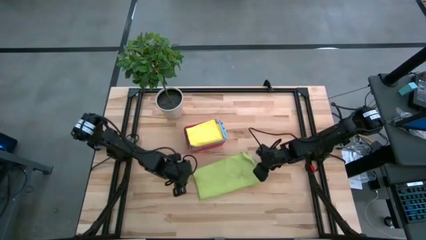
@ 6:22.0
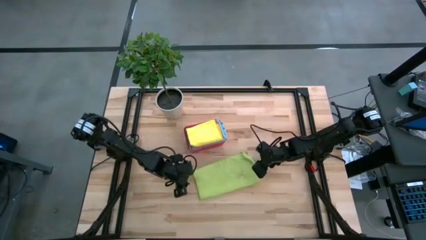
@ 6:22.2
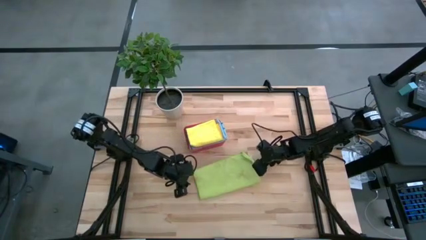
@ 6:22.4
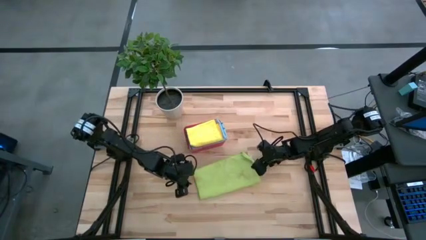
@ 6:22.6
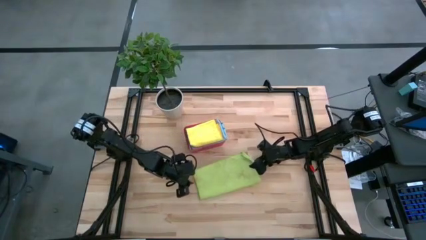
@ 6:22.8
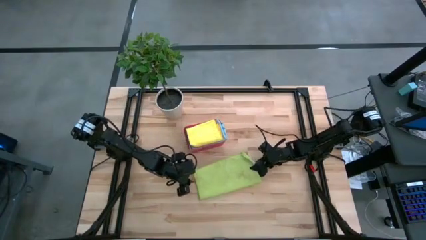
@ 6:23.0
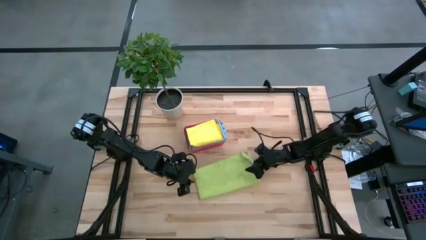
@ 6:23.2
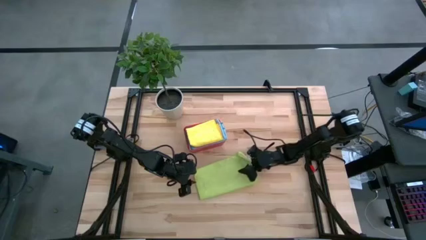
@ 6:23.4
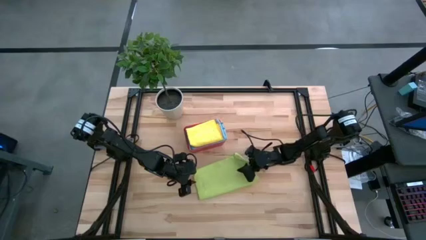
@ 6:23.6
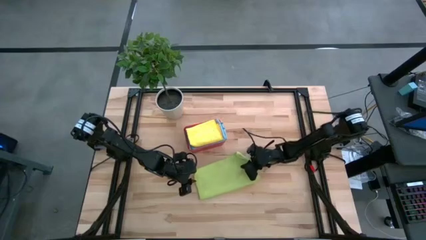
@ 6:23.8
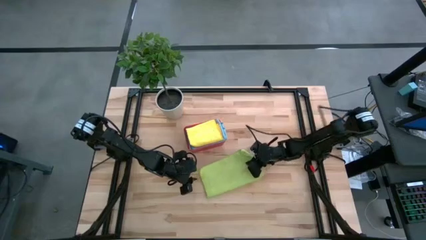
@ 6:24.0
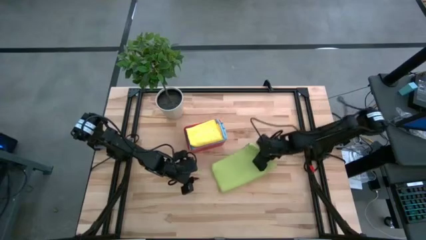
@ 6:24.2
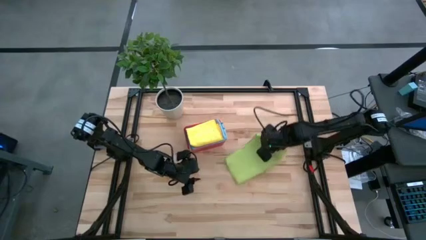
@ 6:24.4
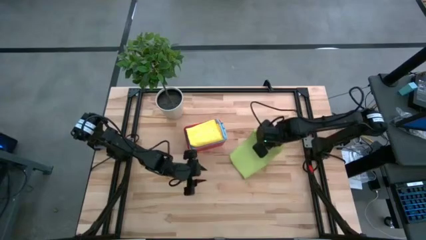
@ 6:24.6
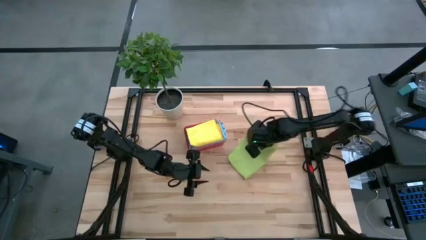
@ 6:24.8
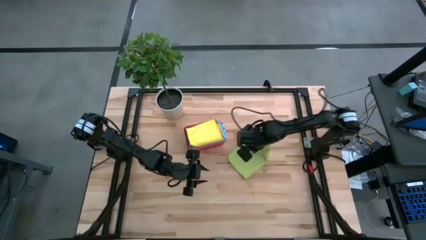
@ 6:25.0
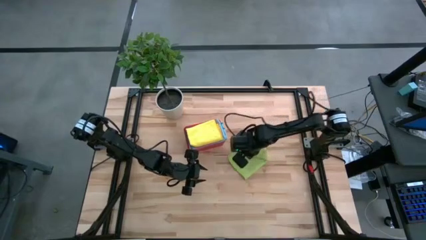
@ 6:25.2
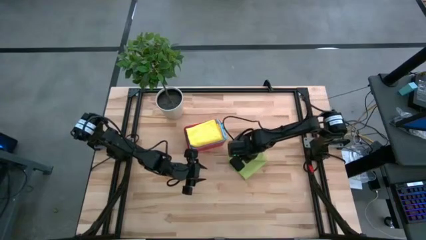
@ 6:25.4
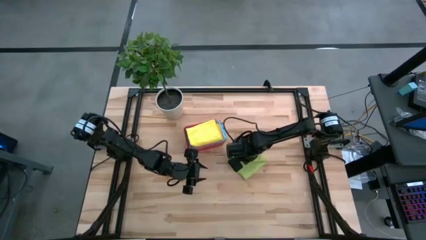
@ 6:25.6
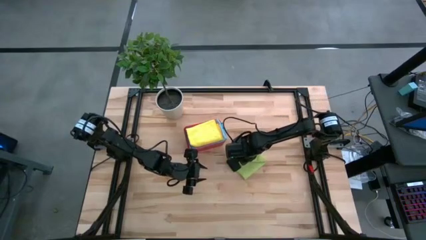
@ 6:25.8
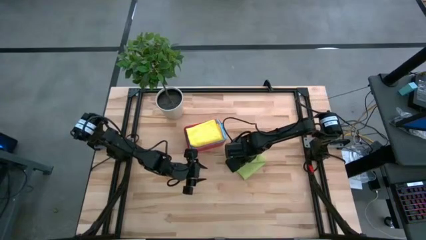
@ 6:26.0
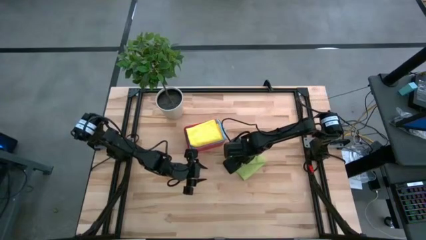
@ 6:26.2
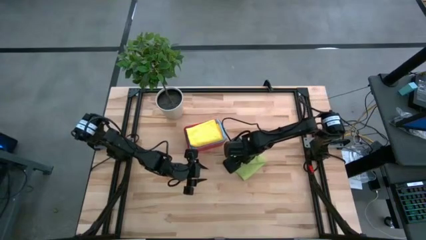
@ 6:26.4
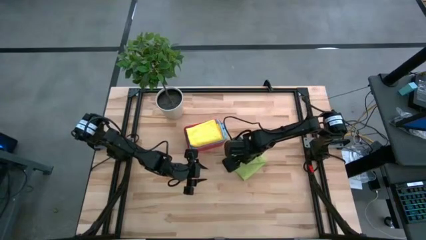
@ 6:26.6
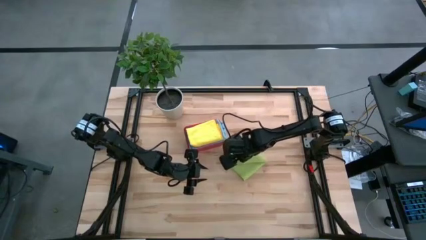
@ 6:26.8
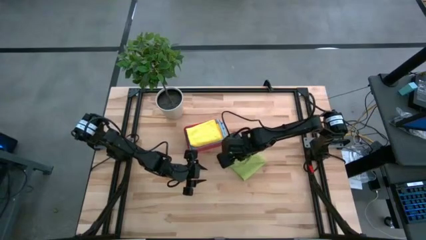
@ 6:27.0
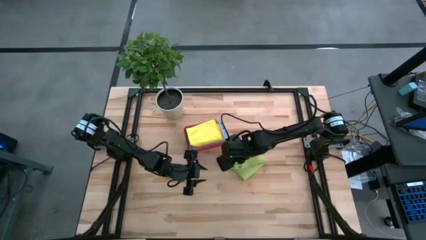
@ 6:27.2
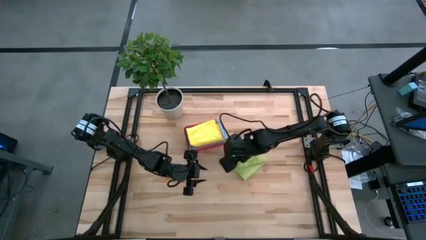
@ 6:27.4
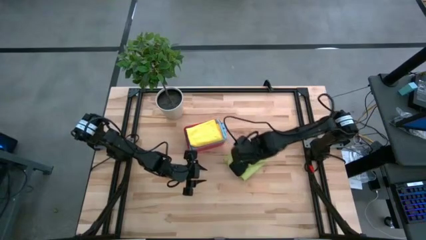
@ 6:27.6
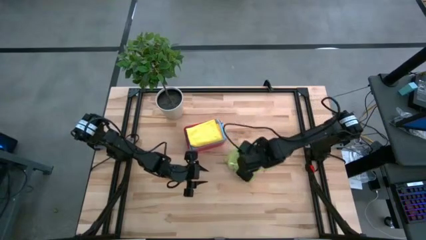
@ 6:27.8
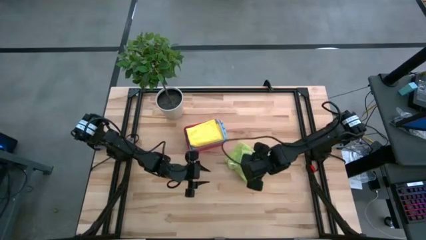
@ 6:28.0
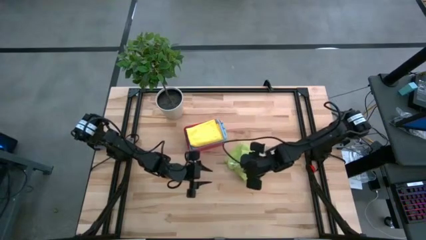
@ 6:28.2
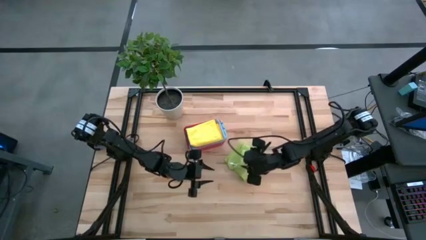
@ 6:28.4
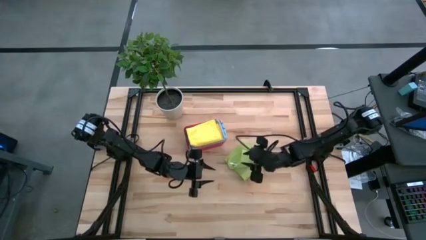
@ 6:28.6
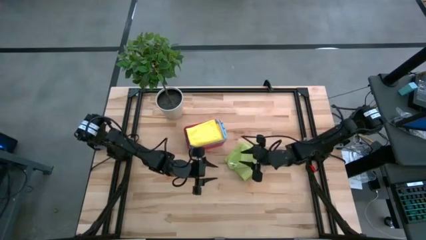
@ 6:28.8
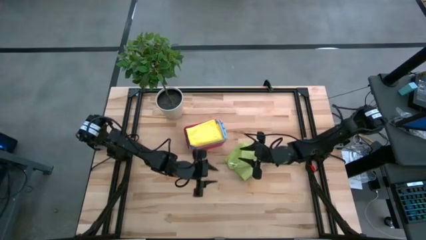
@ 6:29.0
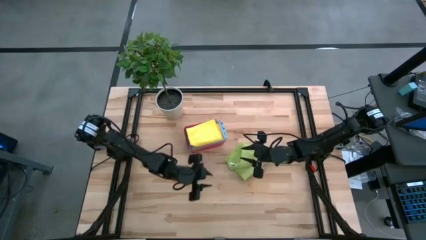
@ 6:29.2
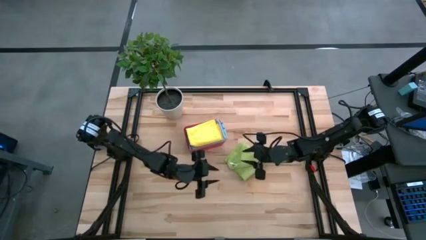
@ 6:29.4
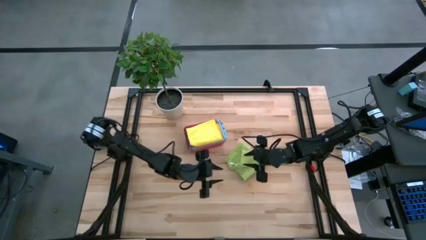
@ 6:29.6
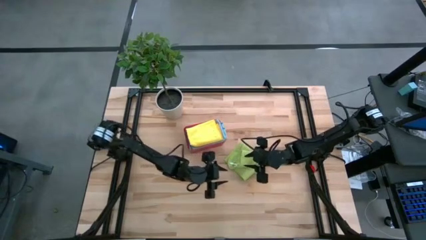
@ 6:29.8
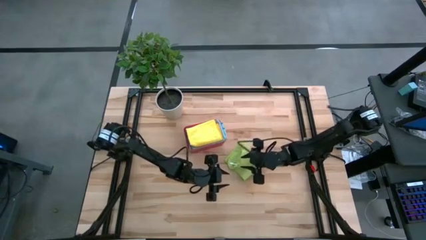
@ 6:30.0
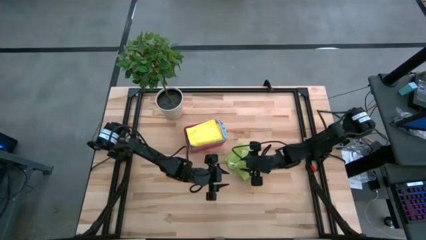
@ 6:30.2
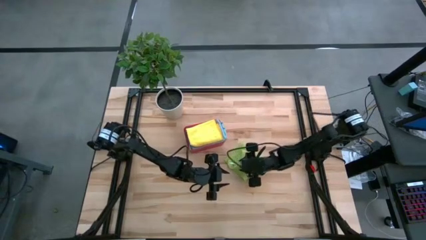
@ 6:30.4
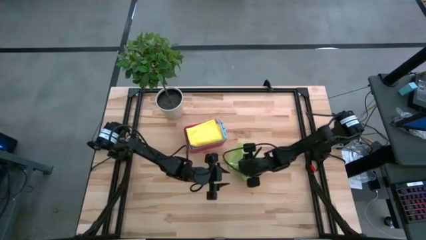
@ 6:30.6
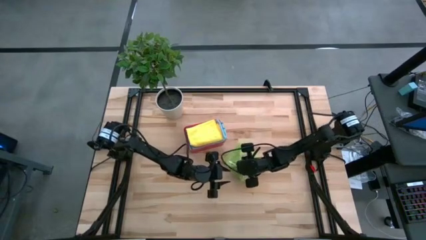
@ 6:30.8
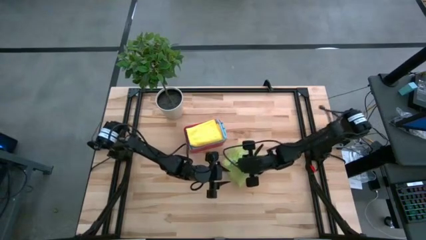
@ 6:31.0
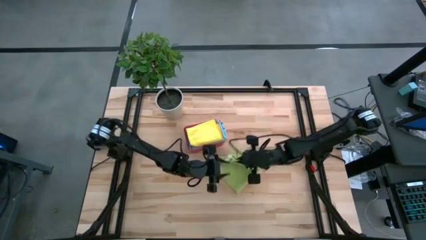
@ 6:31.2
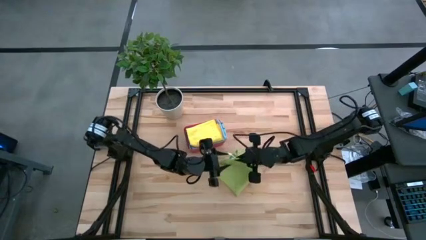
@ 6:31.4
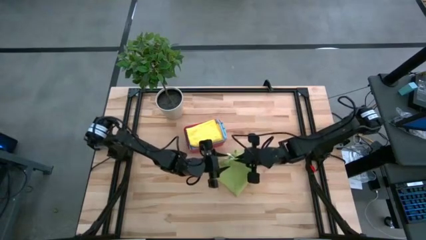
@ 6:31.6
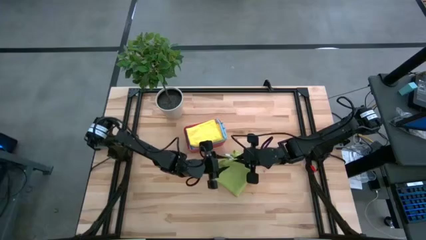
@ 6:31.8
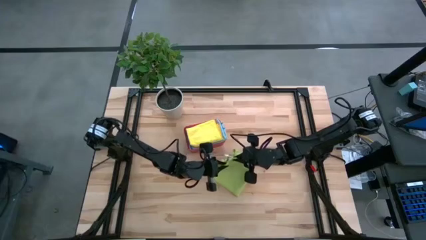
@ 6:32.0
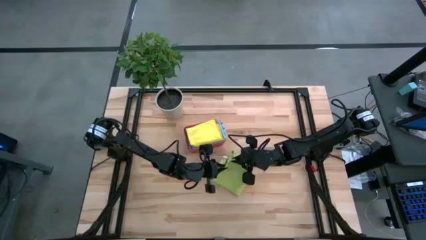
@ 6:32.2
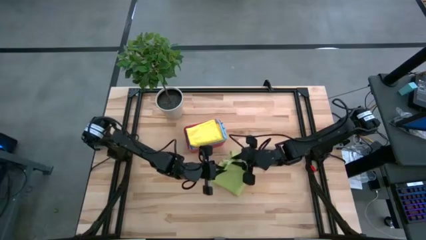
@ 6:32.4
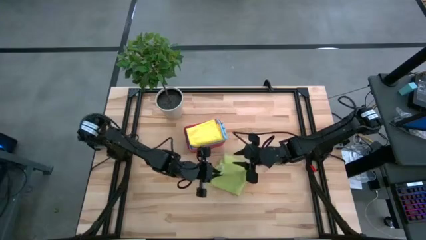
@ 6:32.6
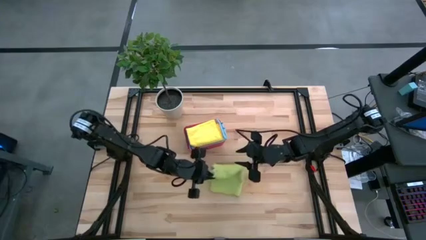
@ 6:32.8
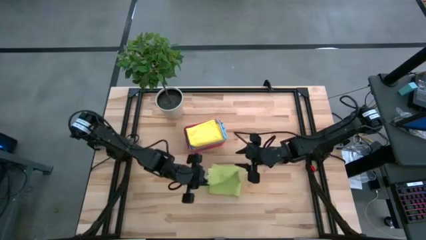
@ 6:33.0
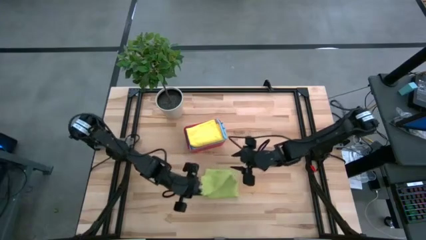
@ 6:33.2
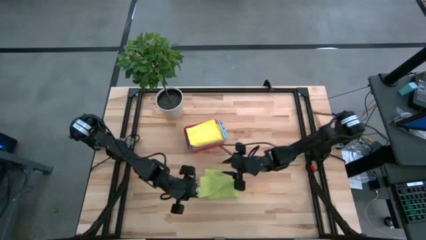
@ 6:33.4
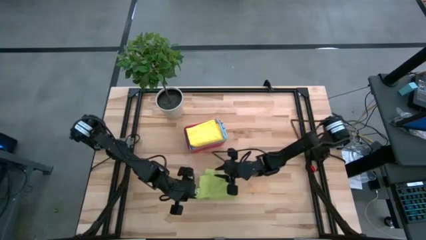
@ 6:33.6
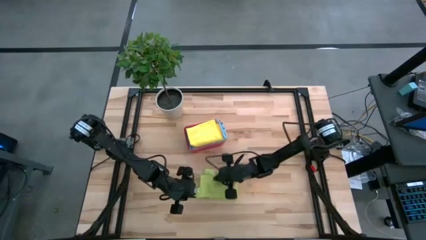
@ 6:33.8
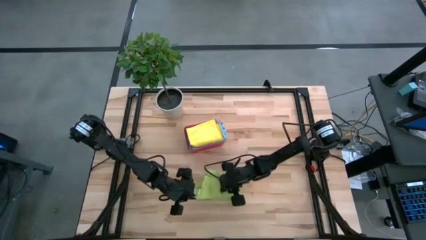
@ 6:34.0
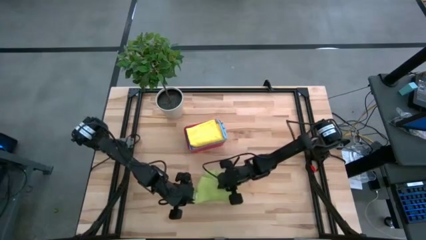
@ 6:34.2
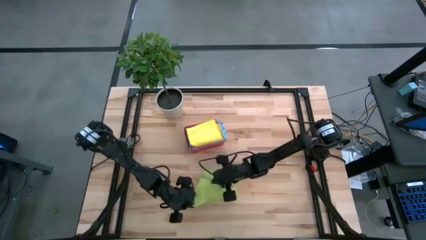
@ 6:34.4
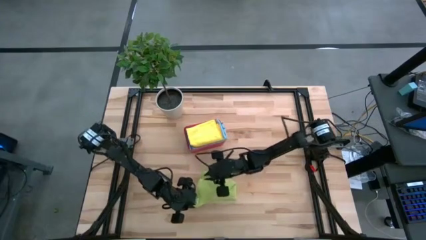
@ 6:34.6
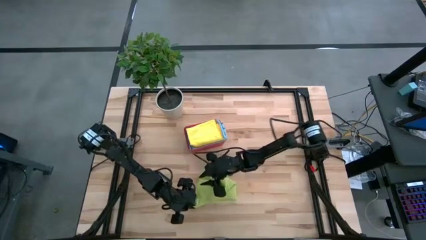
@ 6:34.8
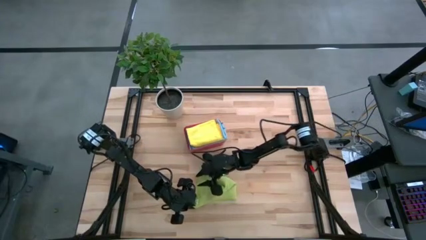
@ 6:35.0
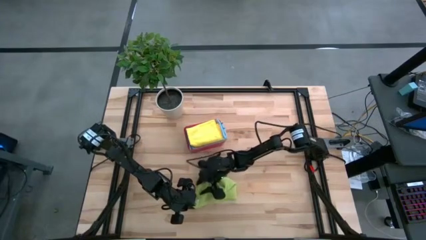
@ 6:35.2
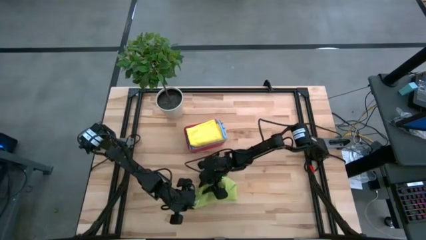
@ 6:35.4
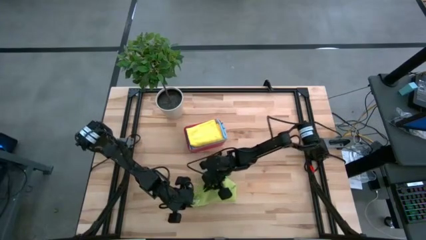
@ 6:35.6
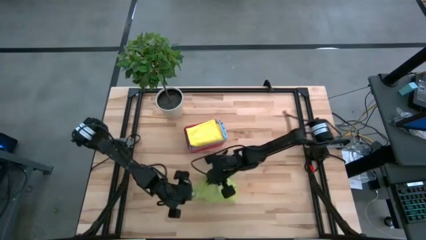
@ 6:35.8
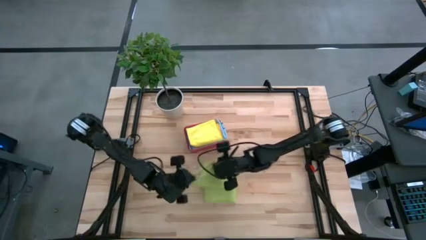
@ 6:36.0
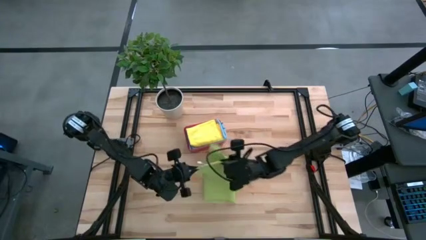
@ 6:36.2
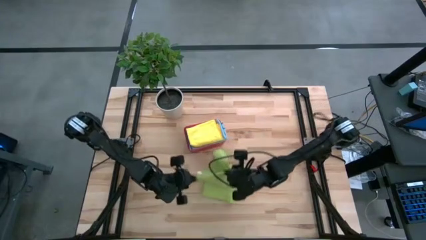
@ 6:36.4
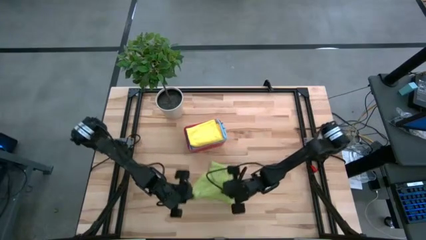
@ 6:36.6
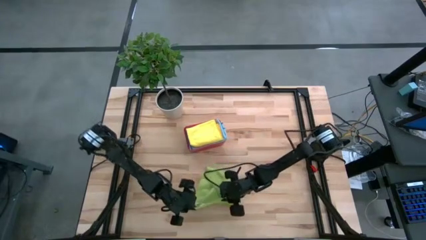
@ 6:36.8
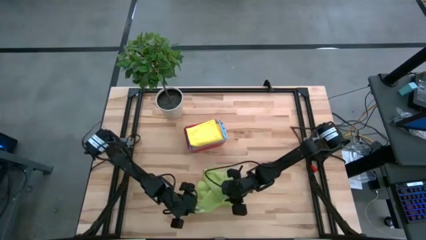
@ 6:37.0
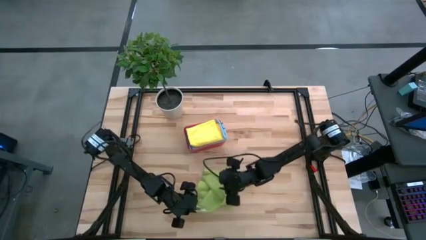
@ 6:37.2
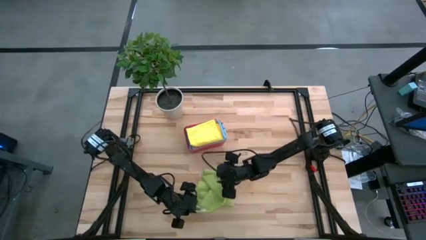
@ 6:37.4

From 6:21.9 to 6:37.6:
Task: Fold microfiber towels
Fold the green microfiber cloth

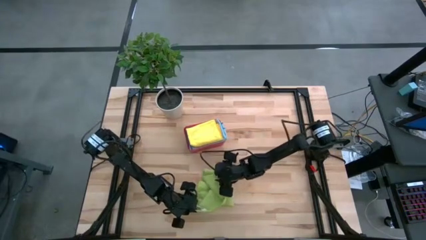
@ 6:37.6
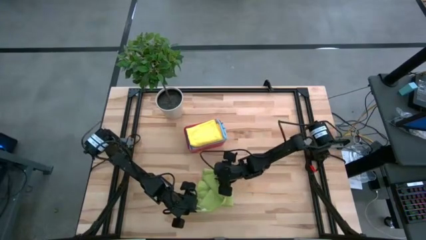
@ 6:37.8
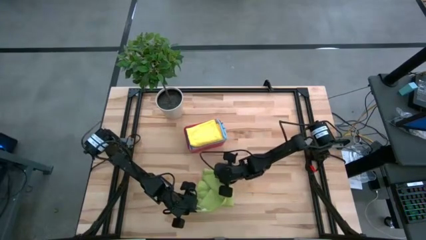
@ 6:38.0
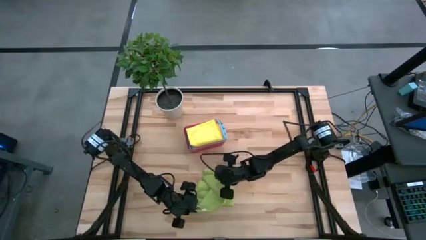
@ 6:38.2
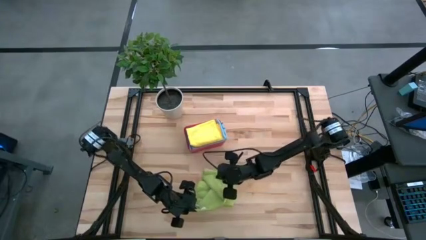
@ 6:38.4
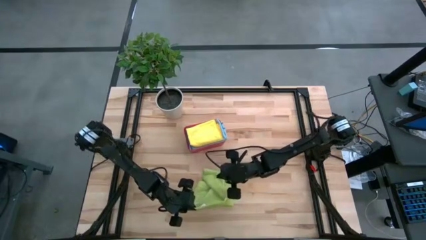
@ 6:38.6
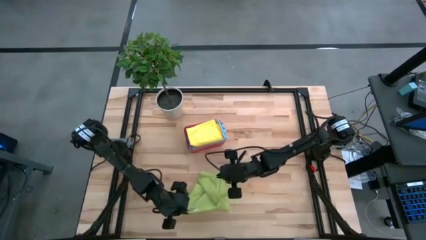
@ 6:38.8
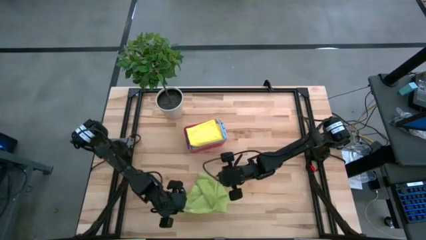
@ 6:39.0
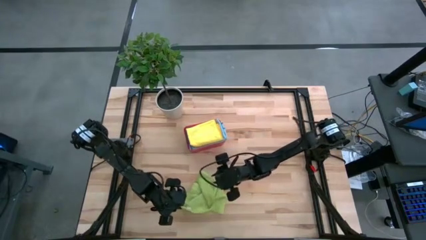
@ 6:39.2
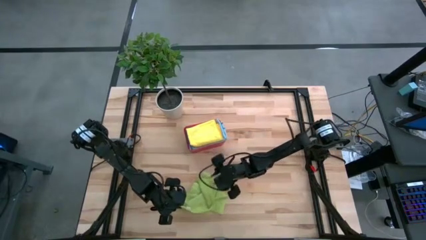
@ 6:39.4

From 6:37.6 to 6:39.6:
Fold the green microfiber cloth
